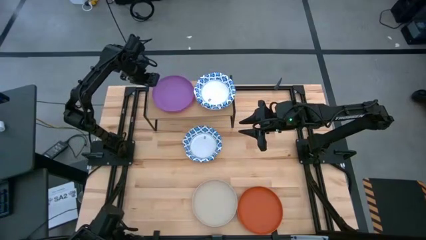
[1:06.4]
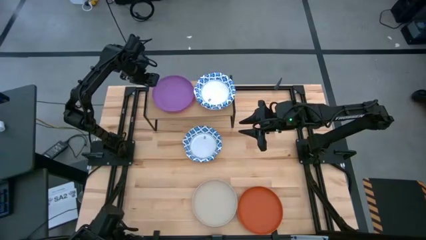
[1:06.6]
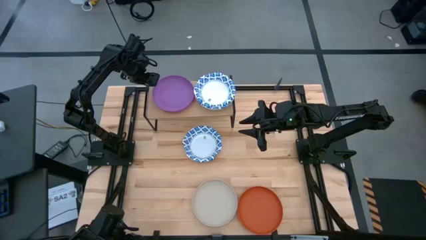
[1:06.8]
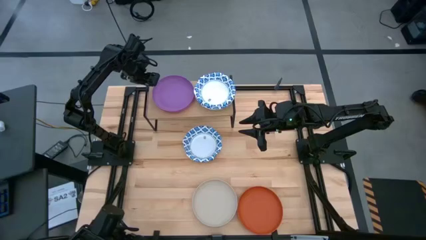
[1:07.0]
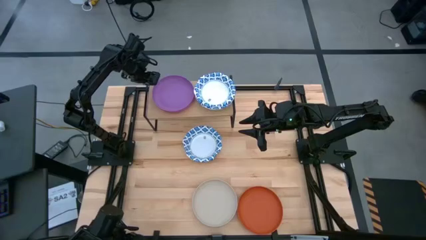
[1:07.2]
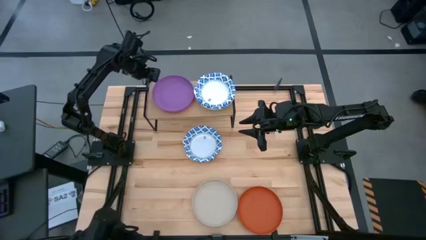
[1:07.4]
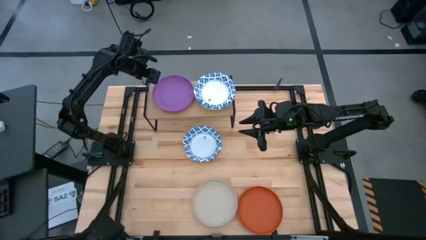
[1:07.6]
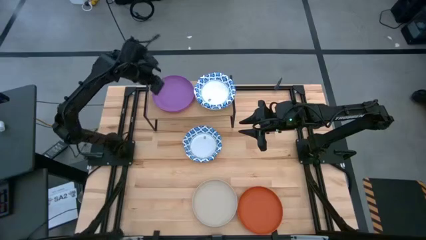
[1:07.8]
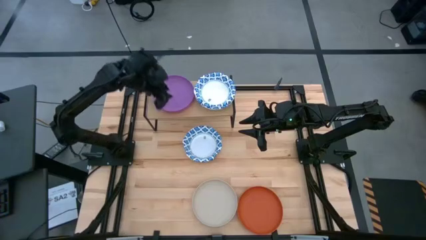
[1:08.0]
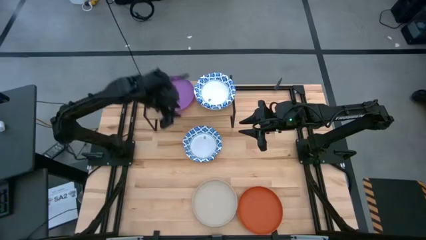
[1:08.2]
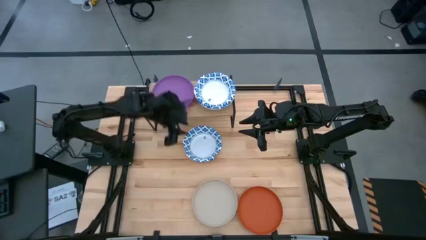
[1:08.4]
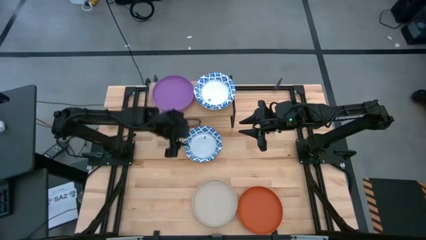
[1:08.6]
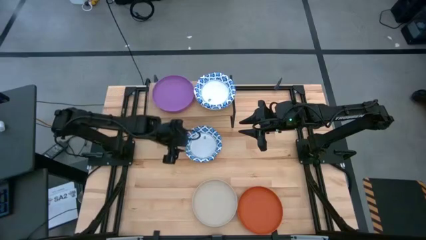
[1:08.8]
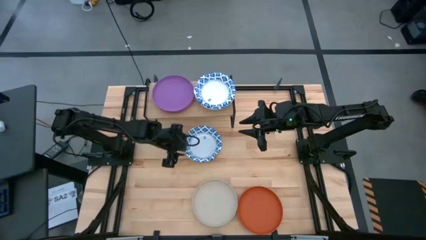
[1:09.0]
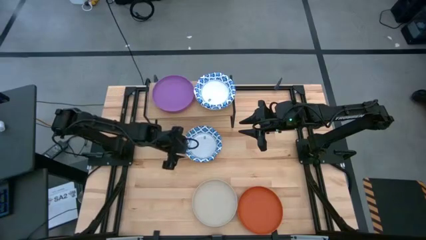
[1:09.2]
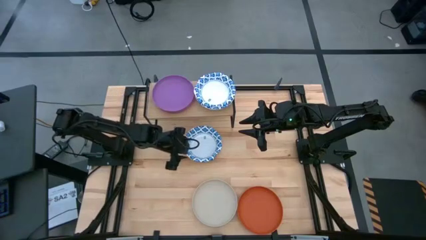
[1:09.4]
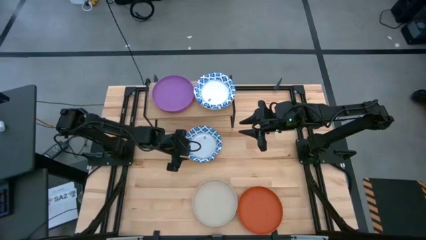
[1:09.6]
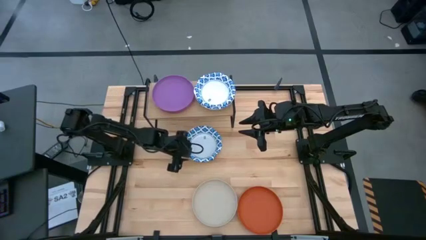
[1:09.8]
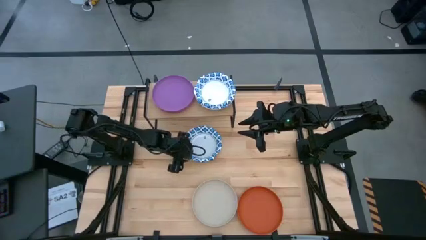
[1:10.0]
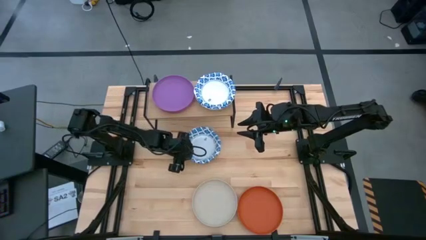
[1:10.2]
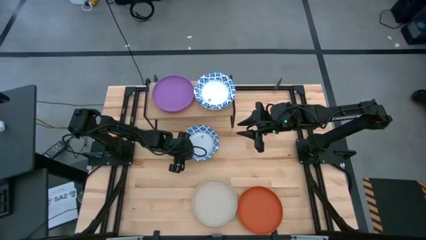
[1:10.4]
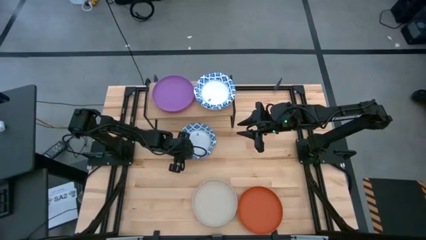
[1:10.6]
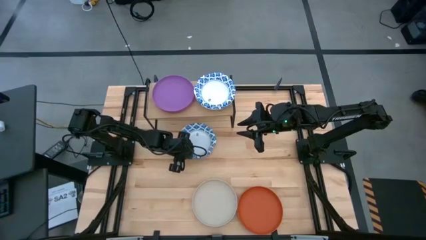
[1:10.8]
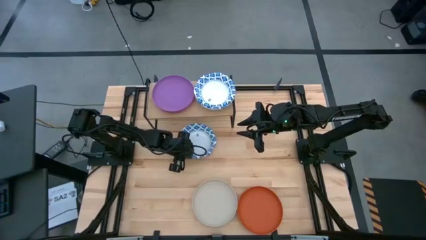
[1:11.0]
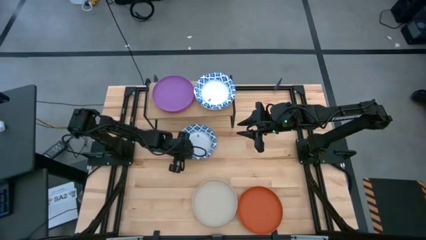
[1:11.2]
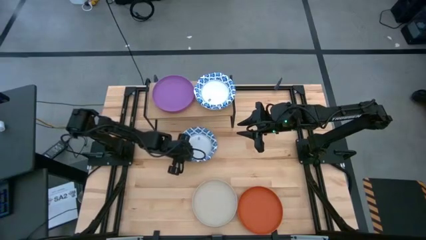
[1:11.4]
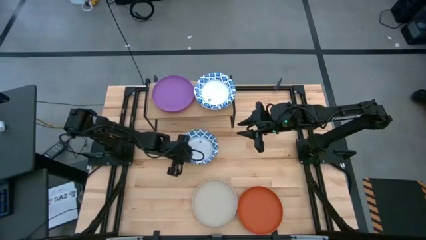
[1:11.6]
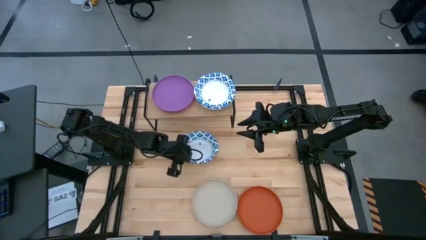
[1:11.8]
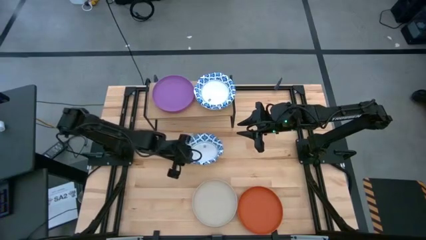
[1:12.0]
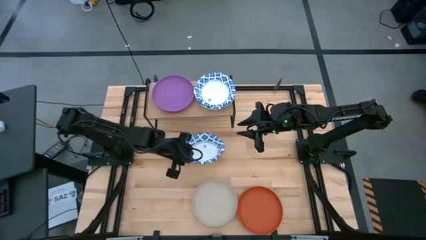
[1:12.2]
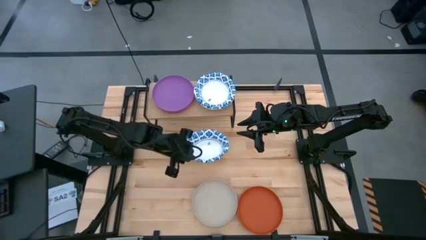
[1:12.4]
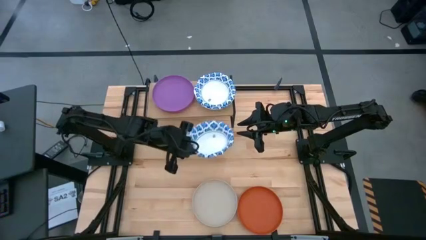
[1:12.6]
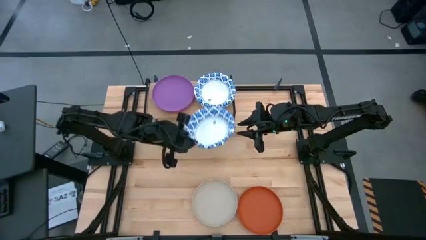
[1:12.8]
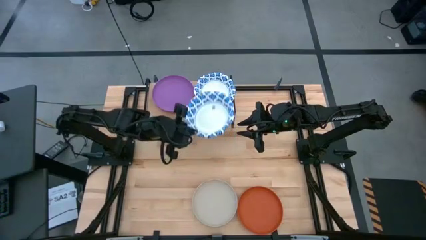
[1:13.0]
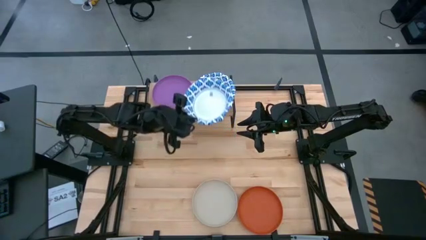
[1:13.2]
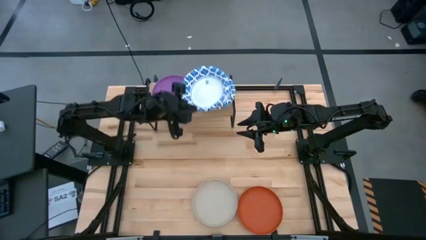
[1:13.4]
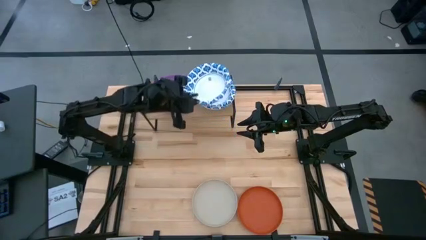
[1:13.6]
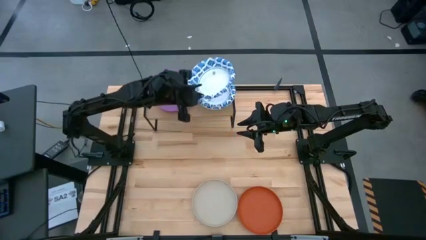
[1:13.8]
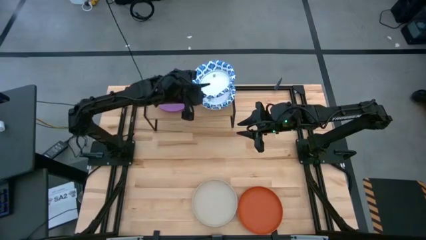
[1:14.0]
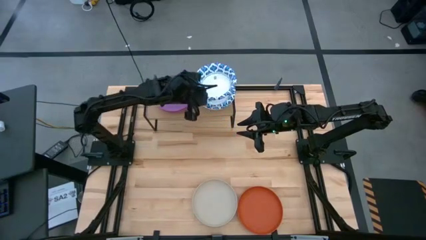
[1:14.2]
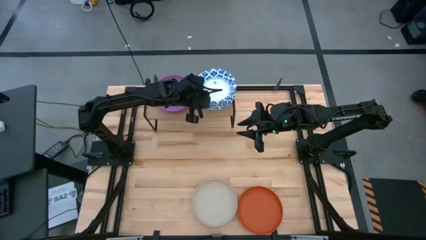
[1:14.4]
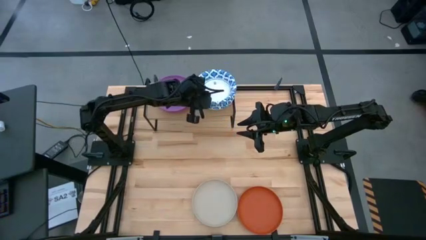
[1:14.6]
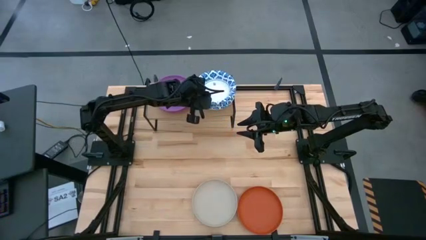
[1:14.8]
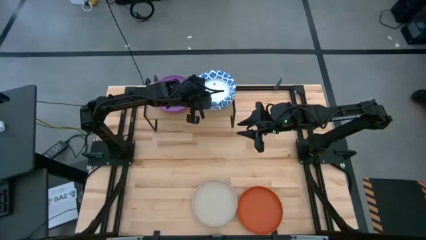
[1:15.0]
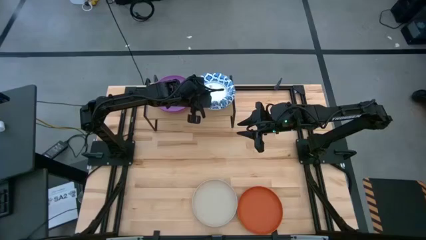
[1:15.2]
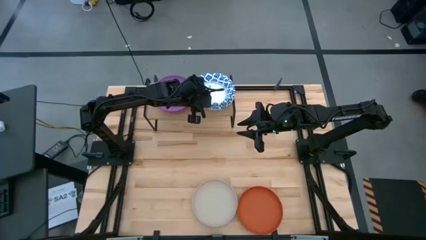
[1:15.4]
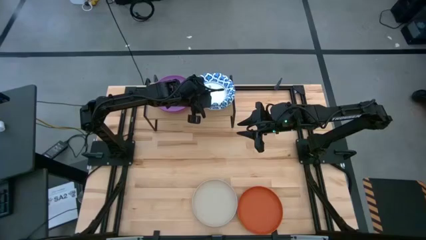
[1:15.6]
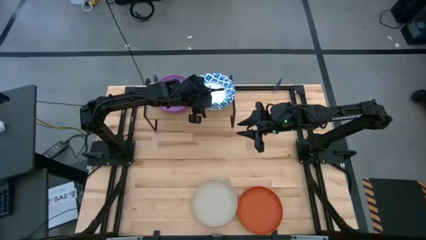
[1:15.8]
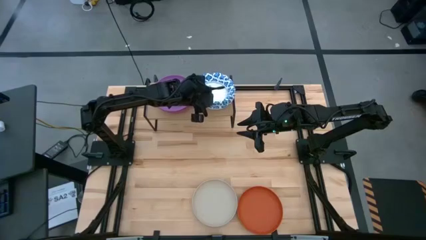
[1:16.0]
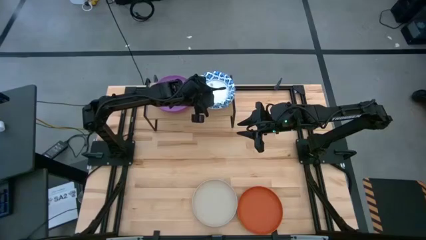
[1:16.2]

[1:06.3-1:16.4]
Task: Place and stack plates onto a shelf
Stack the white patterned bowl on top of the other white patterned bowl on the shelf

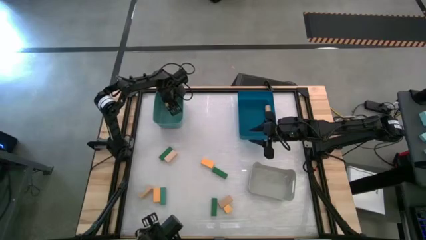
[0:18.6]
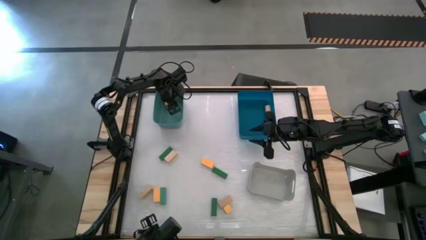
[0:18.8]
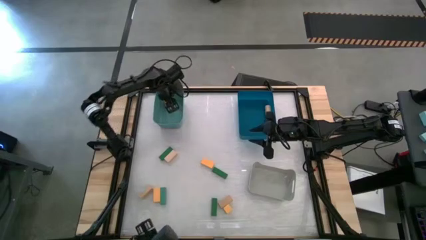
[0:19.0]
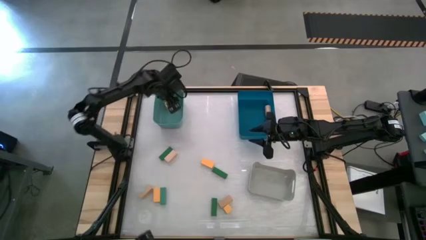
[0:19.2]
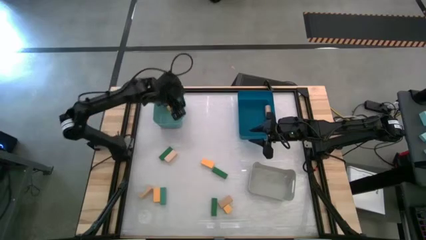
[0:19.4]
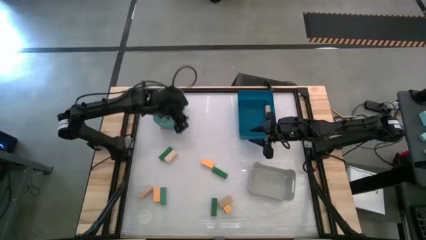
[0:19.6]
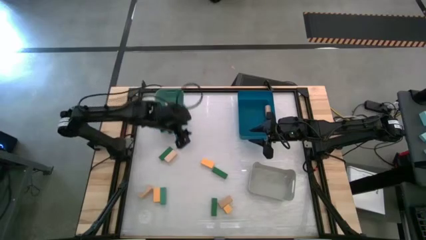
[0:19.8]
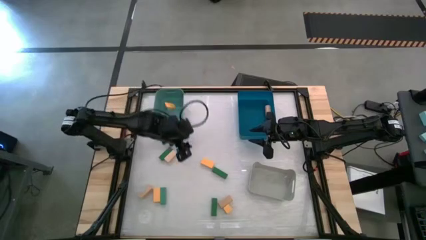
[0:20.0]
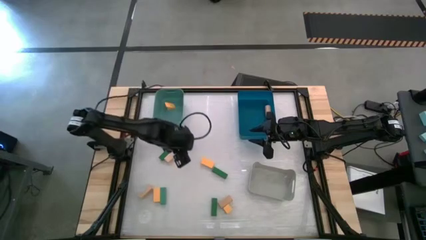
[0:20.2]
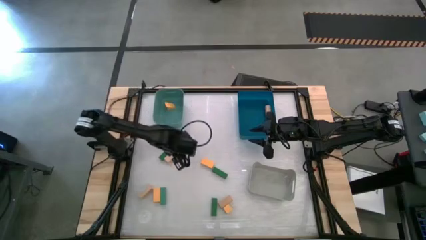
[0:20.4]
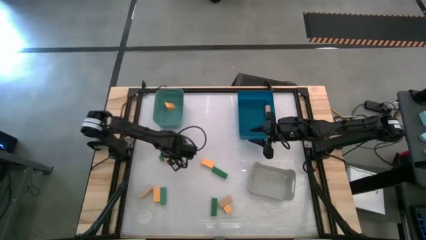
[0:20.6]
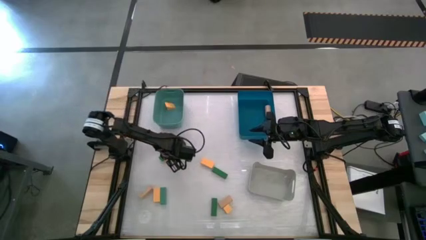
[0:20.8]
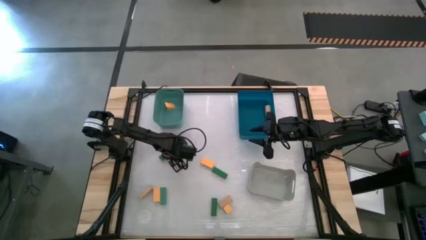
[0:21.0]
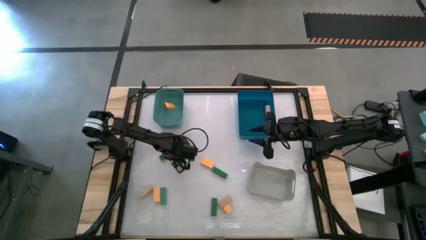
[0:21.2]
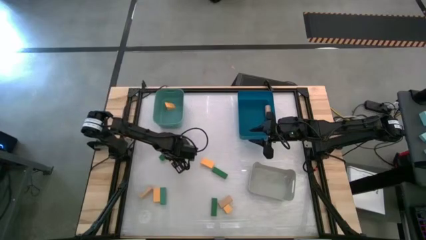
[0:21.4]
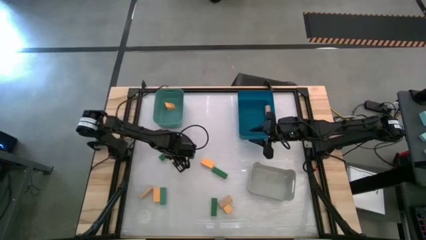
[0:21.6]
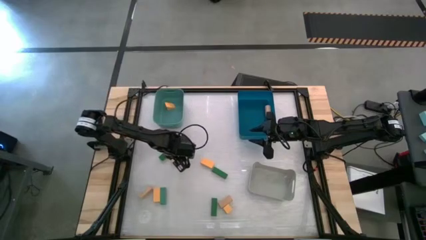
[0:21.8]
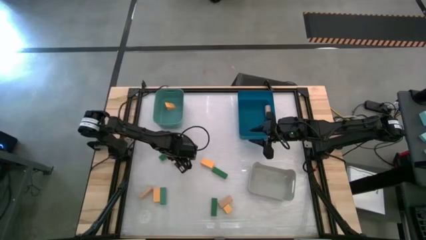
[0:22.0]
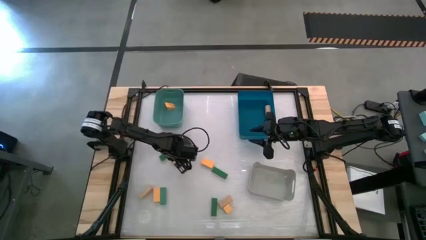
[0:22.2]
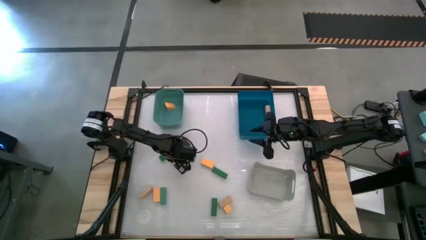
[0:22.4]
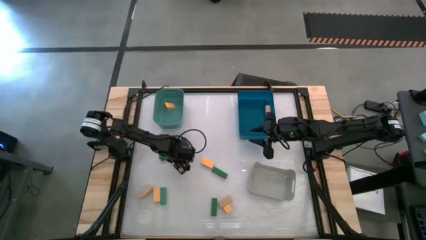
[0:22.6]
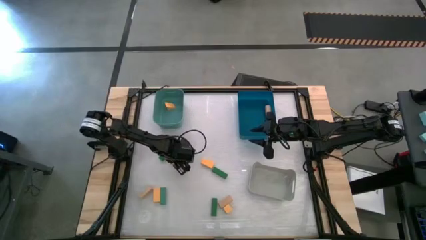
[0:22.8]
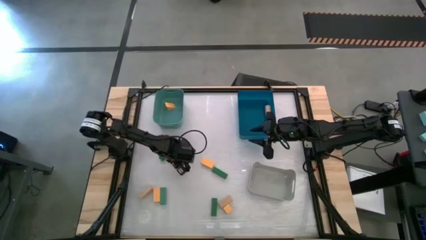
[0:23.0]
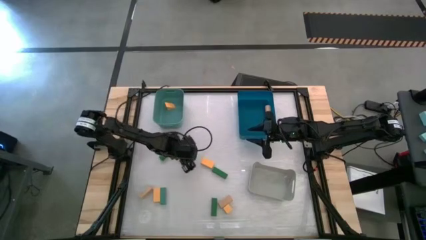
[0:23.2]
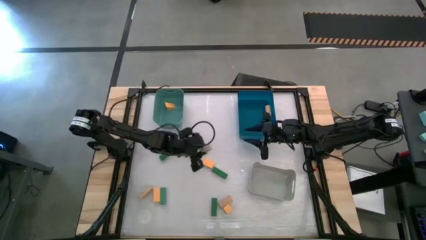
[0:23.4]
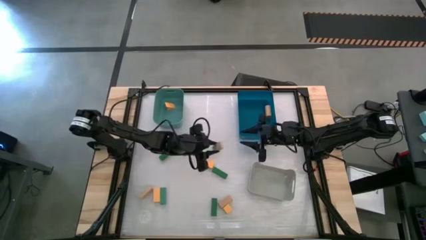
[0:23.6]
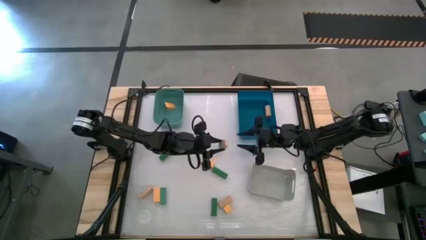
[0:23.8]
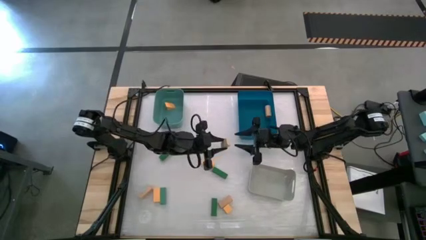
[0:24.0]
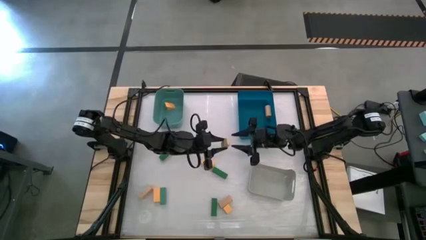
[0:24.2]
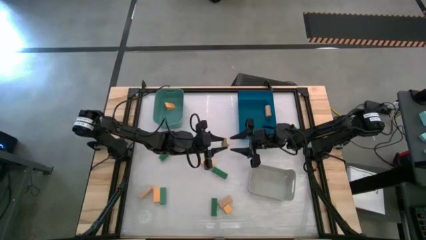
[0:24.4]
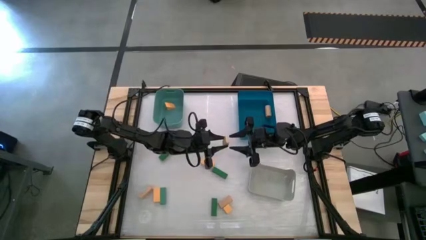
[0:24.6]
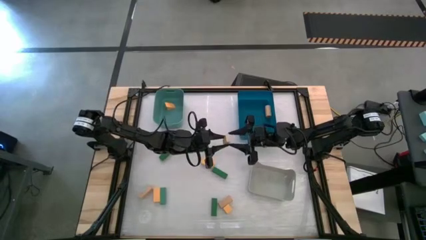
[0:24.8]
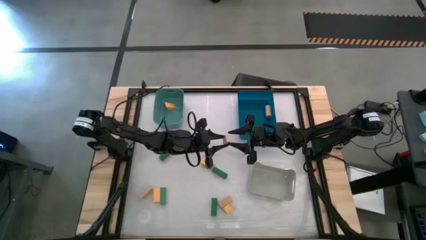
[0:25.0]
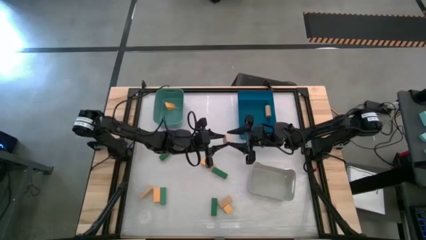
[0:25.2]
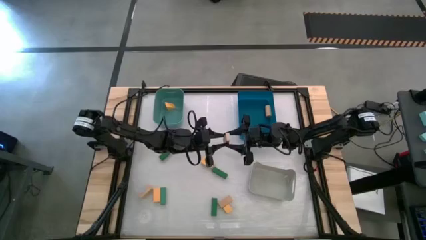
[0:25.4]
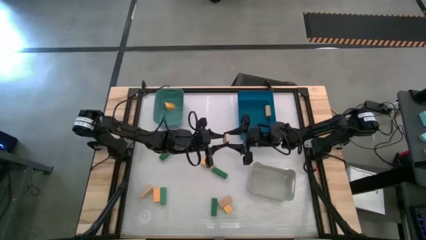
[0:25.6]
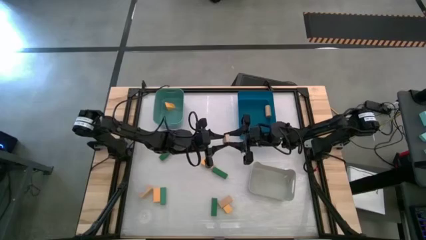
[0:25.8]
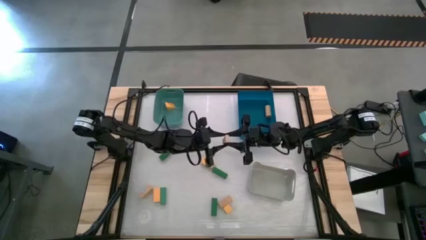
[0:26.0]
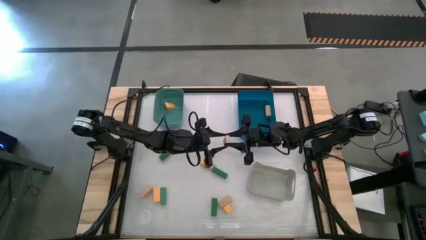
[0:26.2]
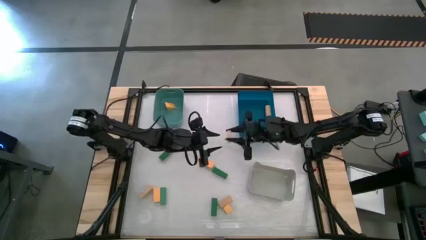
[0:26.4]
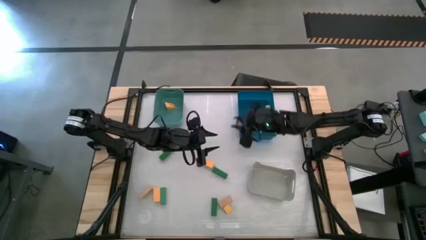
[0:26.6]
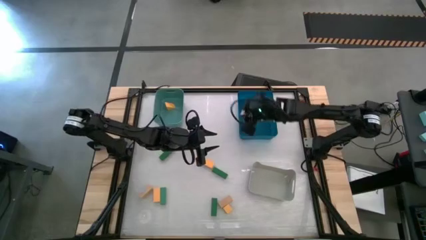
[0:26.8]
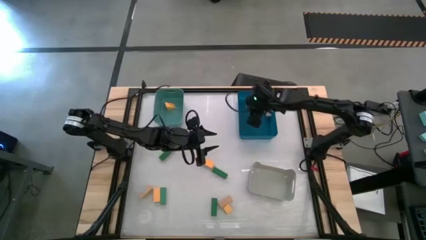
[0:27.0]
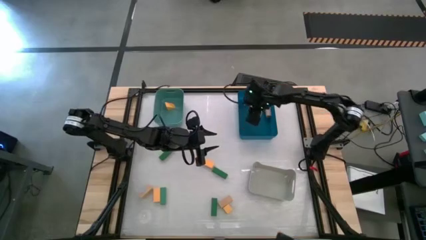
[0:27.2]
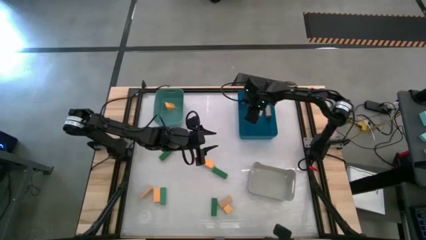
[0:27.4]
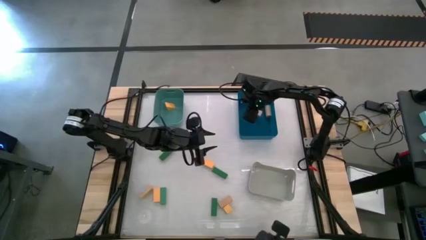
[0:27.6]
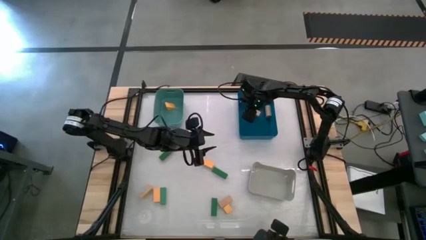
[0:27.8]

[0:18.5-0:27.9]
Task: Sort & place blocks by color
Put the brown wooden block into the dark blue bin
